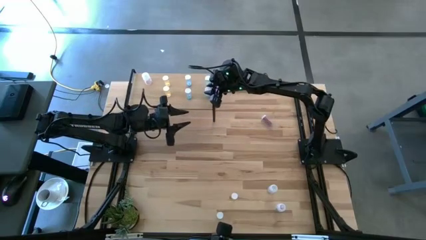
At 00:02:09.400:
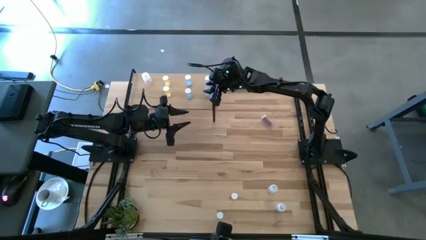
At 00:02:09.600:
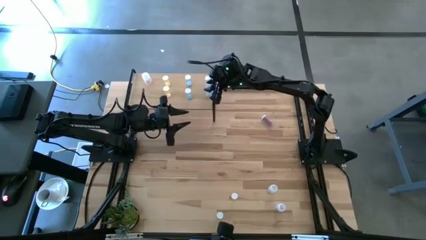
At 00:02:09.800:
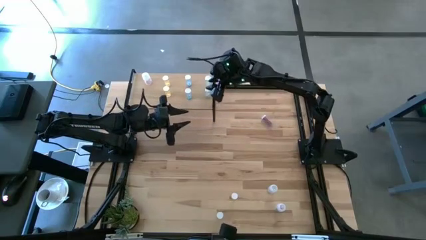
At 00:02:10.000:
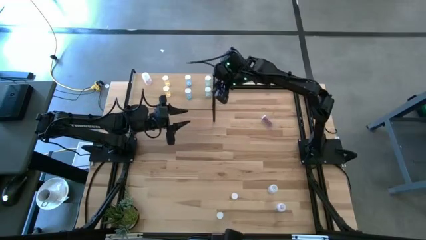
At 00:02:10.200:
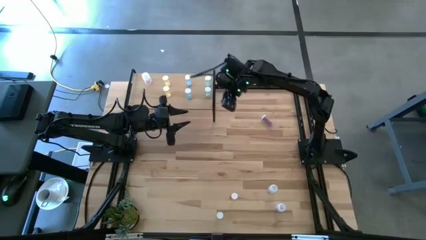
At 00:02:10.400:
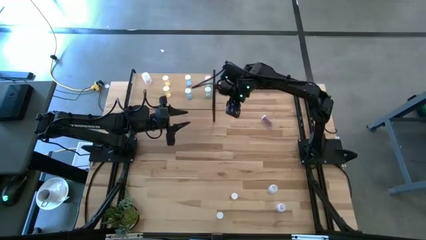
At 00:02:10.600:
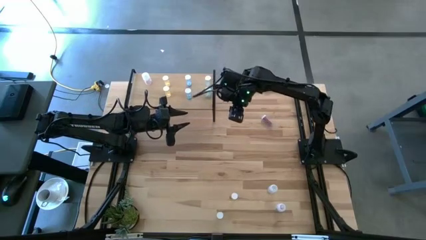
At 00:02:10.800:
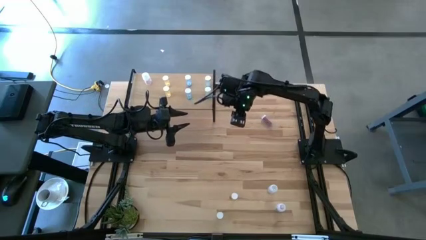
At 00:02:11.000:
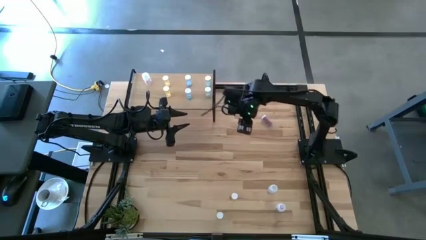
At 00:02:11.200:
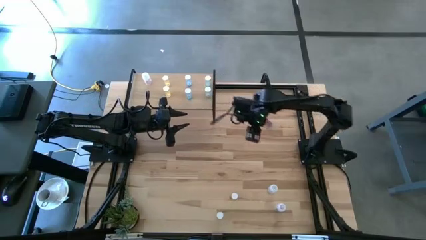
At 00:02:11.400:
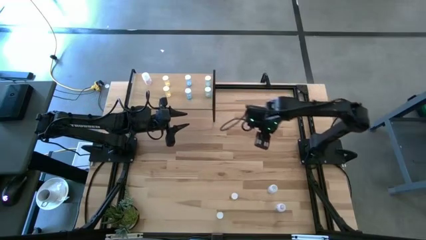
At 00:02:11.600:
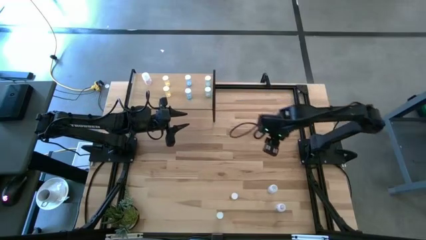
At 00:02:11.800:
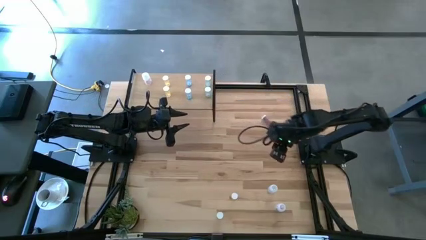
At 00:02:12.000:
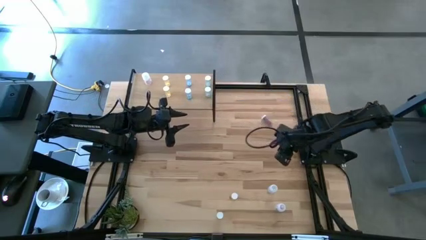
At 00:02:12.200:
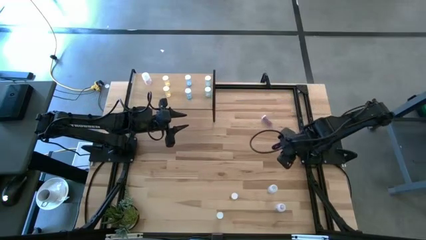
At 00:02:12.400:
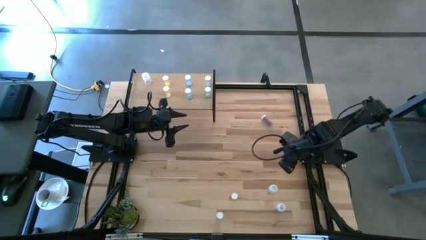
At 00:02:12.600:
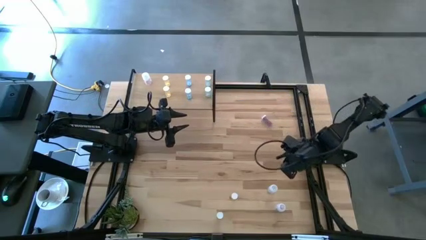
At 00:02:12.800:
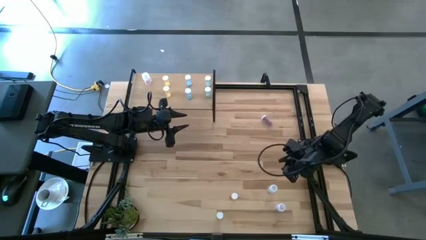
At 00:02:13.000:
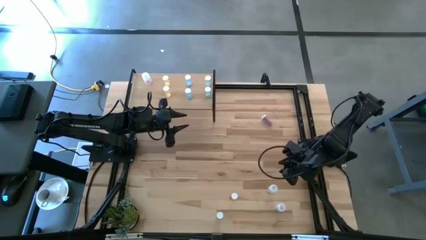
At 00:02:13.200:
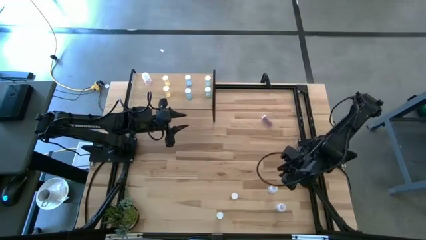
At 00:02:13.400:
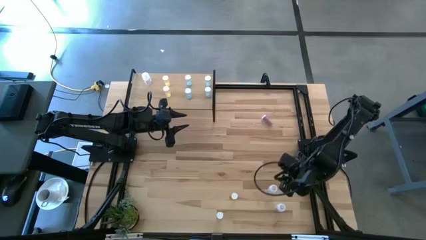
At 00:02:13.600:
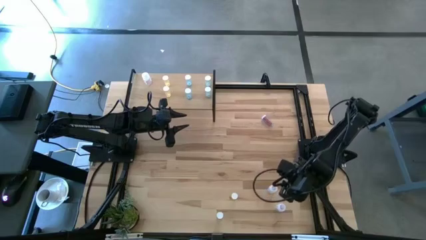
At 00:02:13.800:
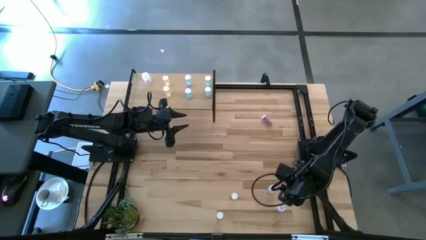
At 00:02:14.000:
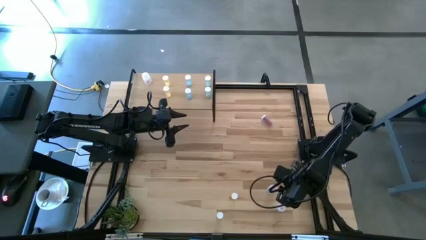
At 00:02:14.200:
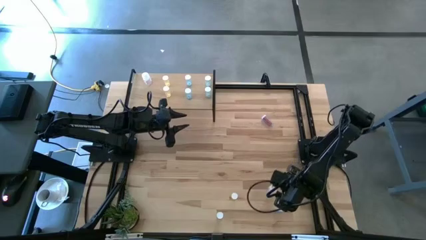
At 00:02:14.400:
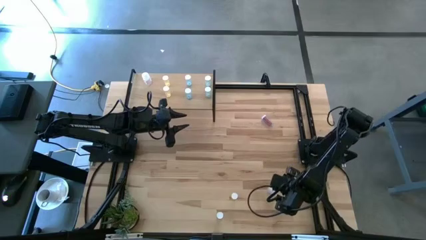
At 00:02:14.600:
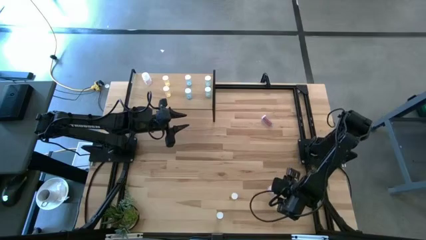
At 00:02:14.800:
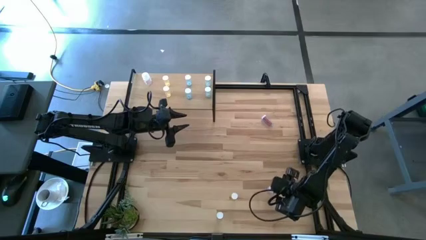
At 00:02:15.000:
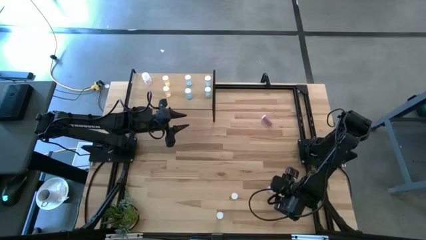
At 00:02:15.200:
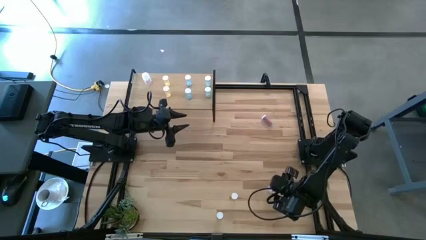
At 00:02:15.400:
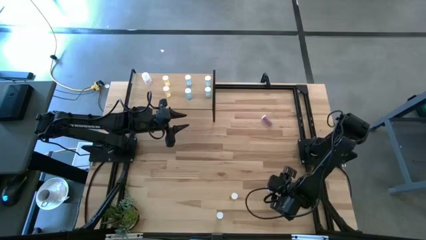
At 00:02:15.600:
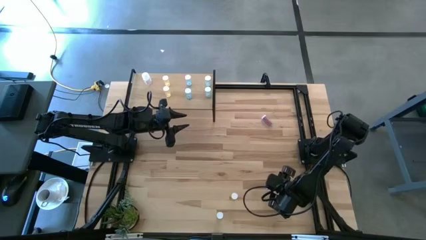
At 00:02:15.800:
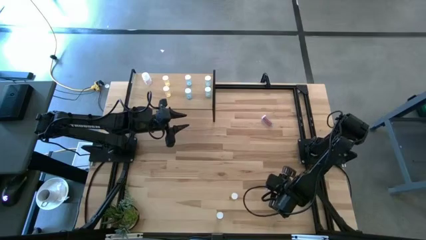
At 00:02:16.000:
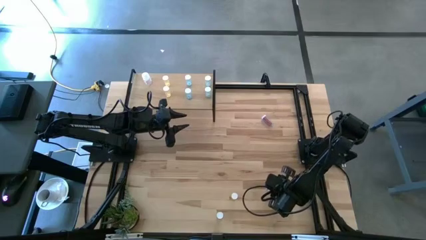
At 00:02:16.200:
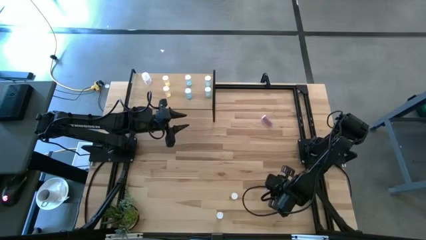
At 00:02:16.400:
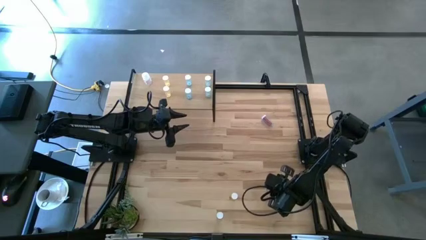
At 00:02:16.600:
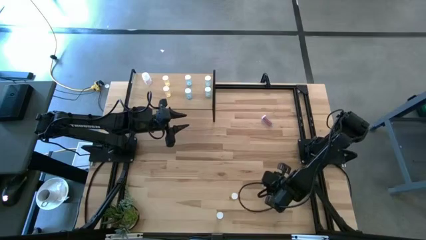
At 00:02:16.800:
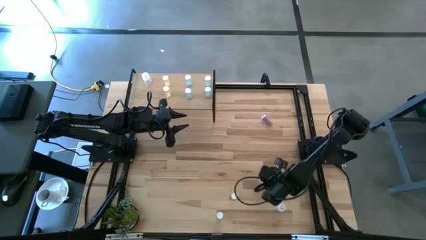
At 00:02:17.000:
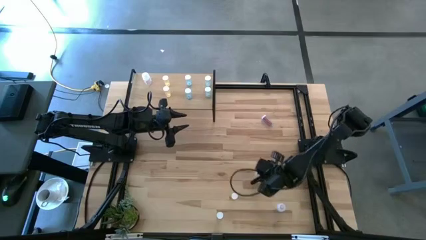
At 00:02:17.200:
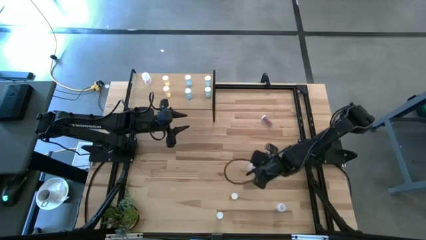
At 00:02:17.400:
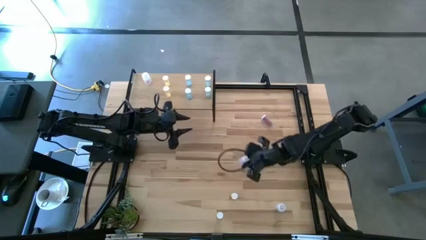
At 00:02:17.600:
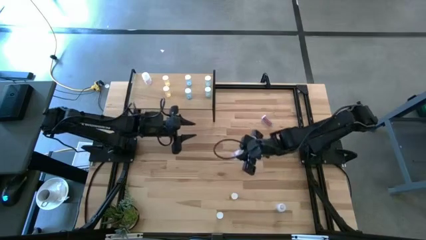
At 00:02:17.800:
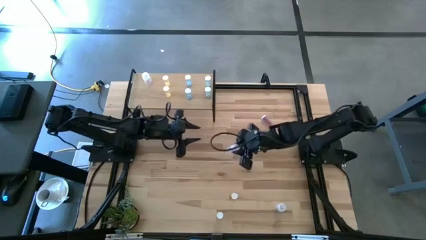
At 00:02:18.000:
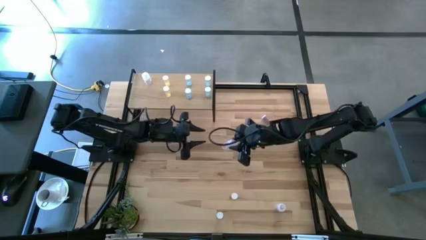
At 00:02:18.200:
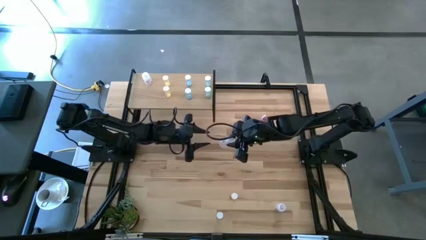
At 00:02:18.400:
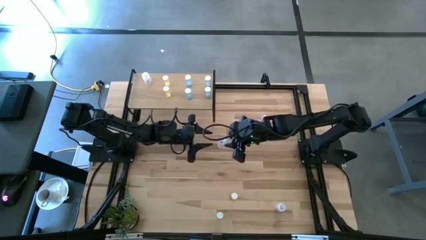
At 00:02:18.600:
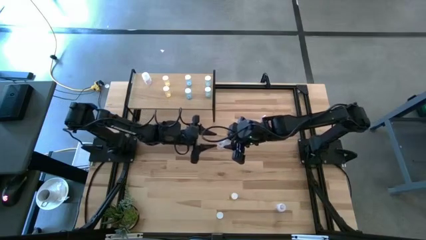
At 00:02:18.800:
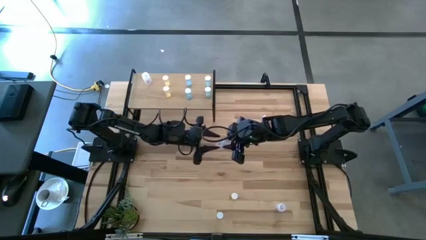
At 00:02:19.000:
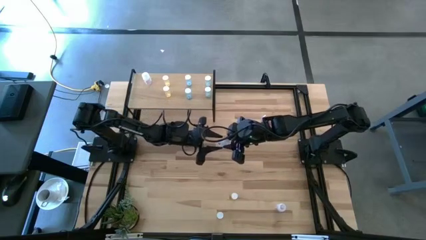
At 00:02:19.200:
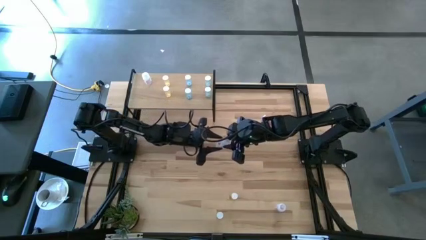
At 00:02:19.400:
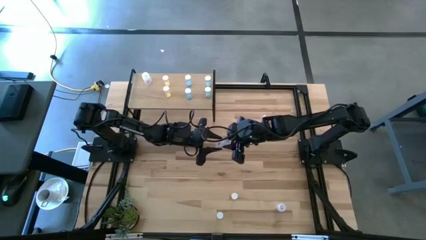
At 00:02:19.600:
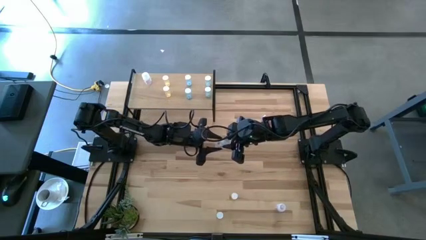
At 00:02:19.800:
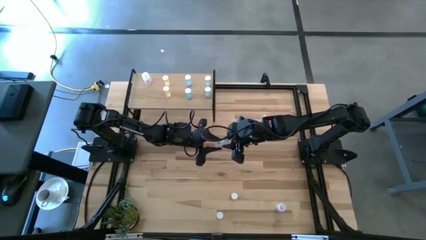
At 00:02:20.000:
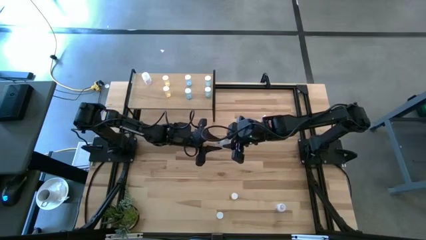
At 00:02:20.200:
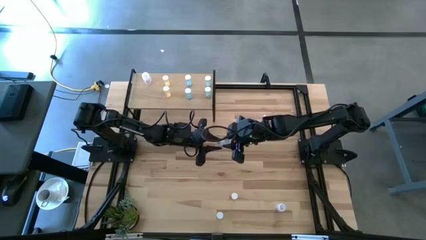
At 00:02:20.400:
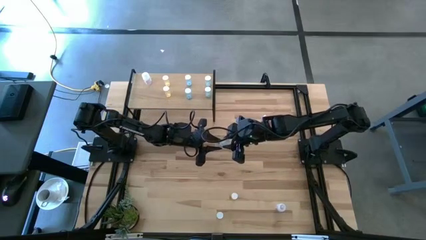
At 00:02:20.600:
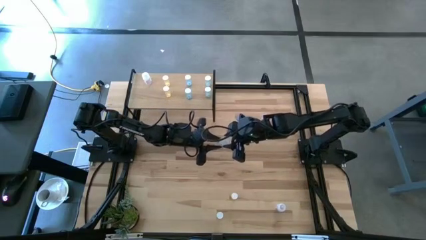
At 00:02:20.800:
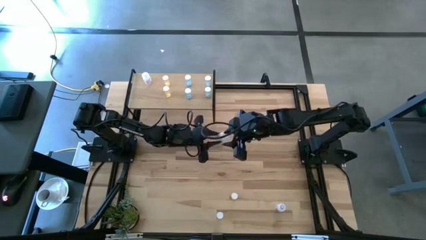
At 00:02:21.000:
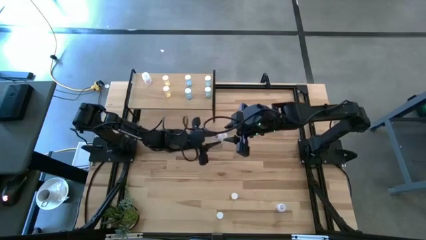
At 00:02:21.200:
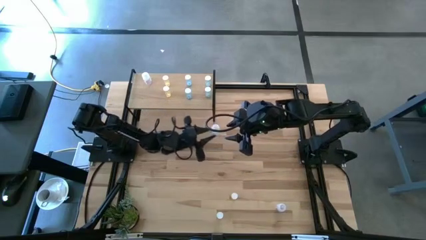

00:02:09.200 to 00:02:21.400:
Task: Pick and place medicine bottles onto shelf by color
Put the top white pill bottle on the shelf aligned with the other white pill bottle
